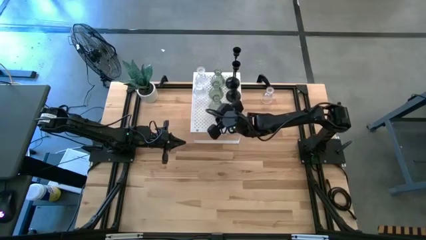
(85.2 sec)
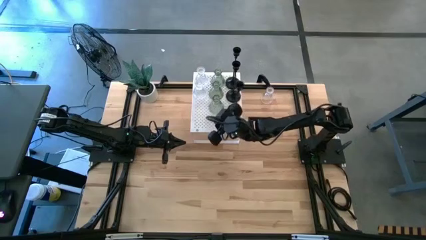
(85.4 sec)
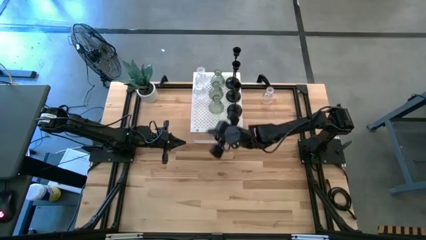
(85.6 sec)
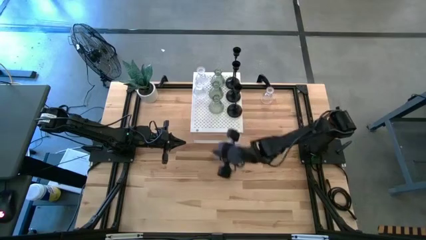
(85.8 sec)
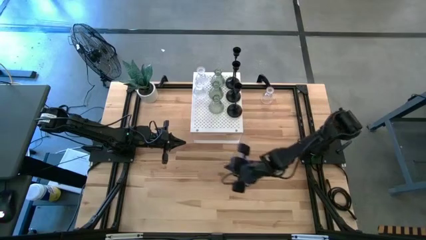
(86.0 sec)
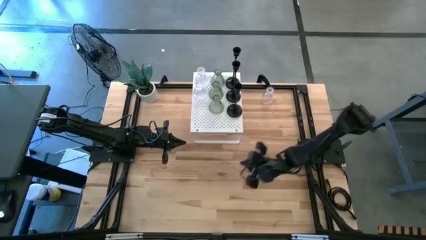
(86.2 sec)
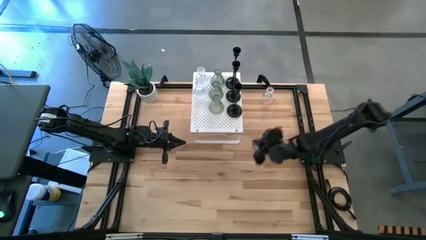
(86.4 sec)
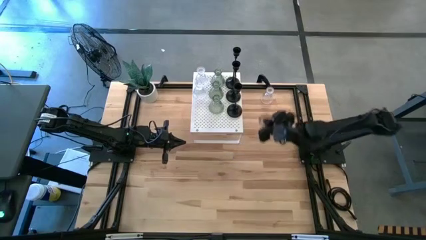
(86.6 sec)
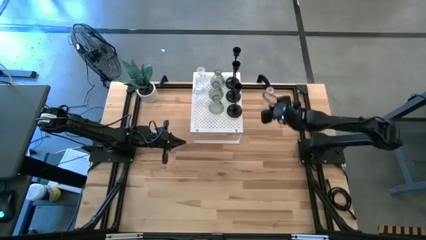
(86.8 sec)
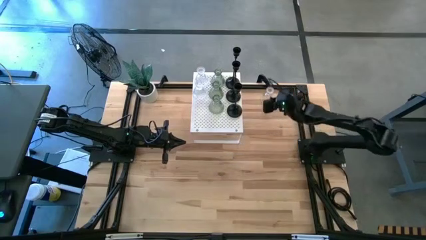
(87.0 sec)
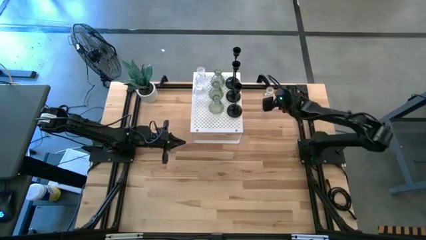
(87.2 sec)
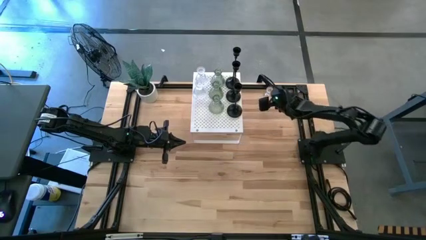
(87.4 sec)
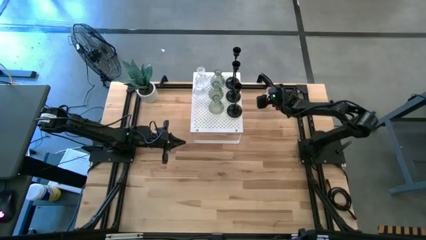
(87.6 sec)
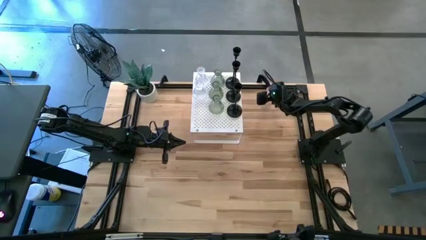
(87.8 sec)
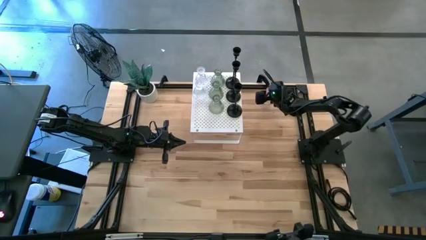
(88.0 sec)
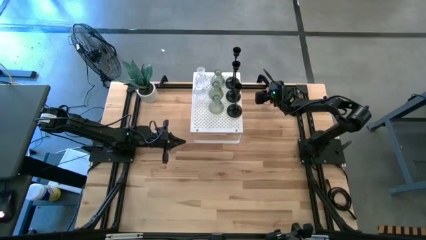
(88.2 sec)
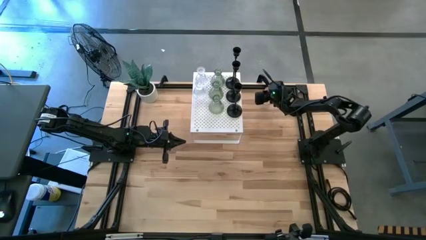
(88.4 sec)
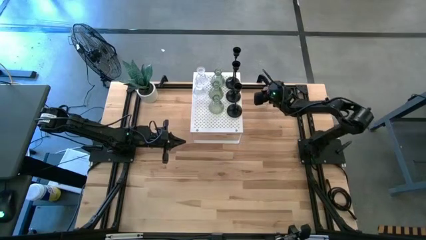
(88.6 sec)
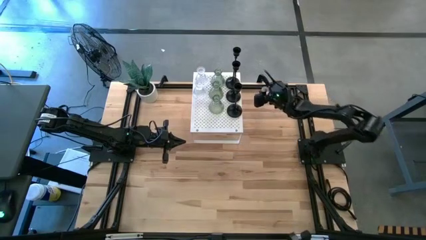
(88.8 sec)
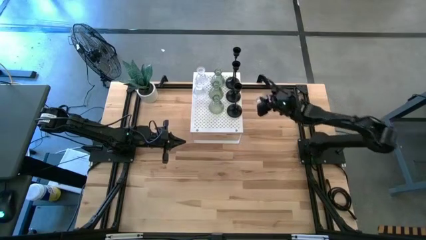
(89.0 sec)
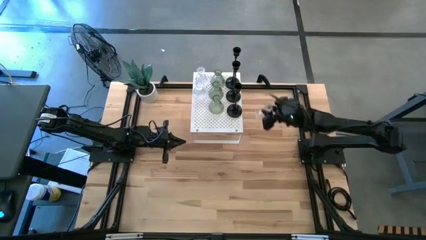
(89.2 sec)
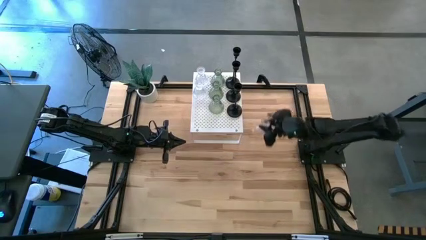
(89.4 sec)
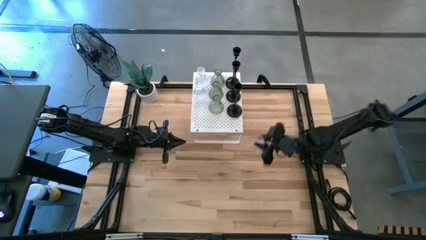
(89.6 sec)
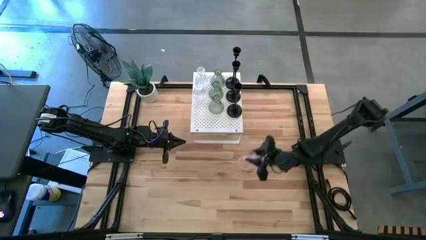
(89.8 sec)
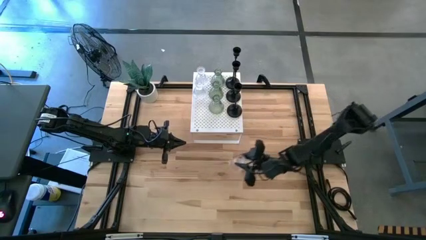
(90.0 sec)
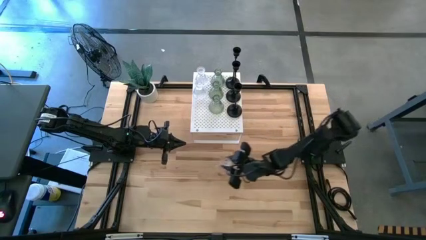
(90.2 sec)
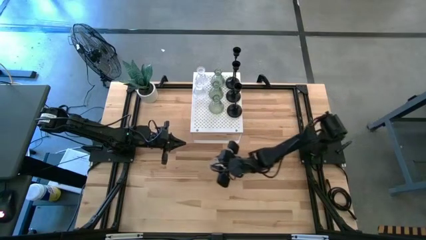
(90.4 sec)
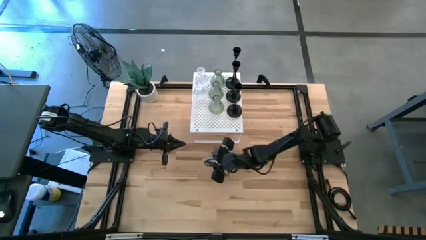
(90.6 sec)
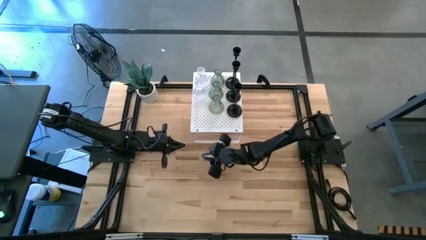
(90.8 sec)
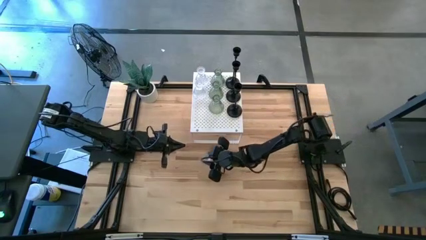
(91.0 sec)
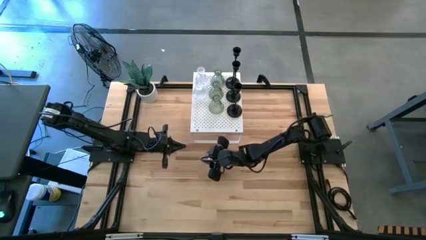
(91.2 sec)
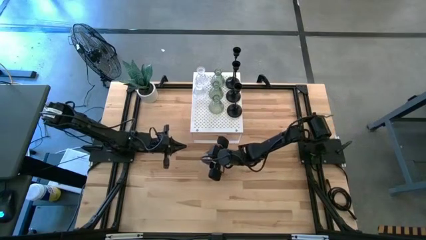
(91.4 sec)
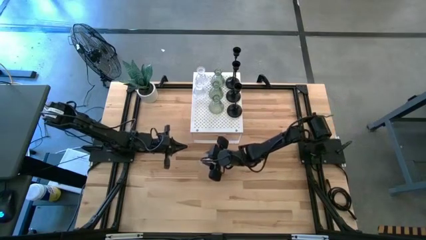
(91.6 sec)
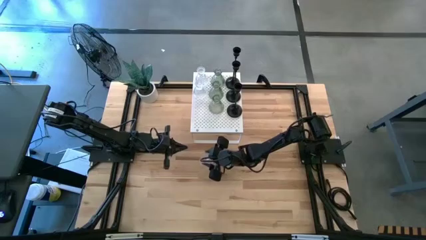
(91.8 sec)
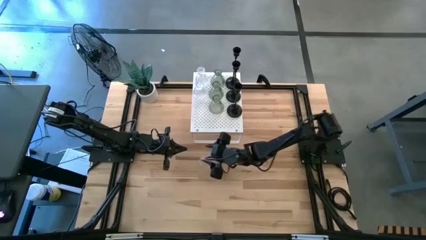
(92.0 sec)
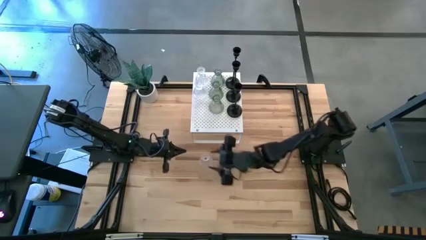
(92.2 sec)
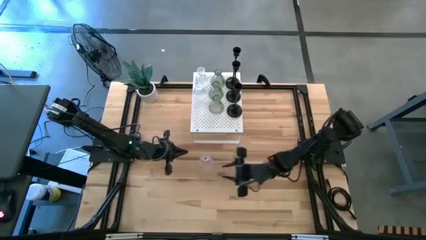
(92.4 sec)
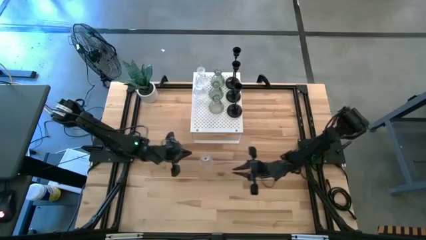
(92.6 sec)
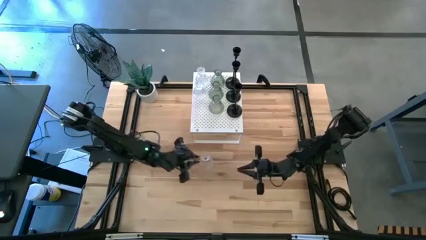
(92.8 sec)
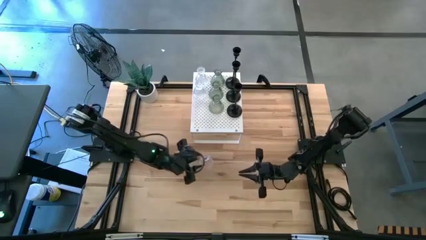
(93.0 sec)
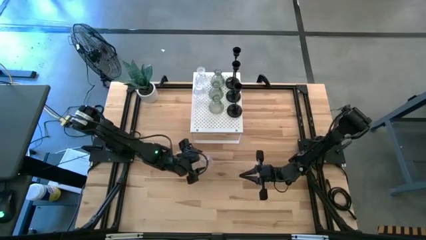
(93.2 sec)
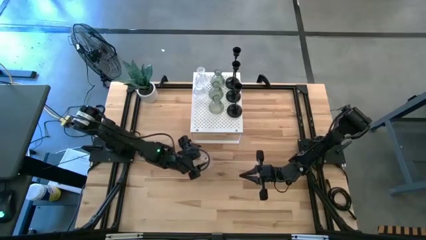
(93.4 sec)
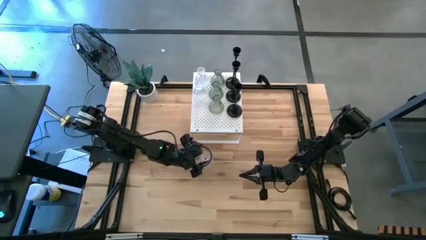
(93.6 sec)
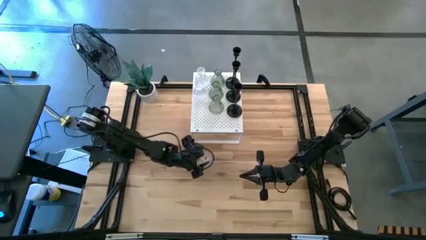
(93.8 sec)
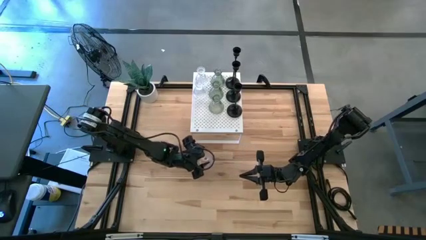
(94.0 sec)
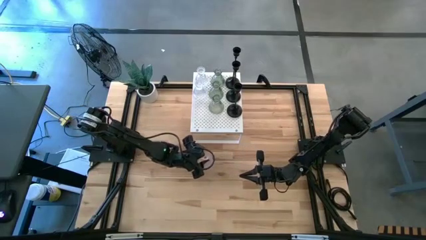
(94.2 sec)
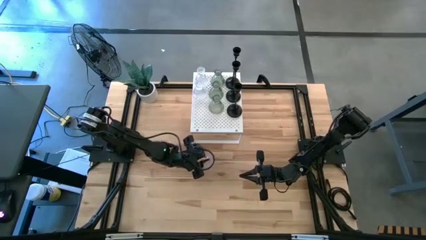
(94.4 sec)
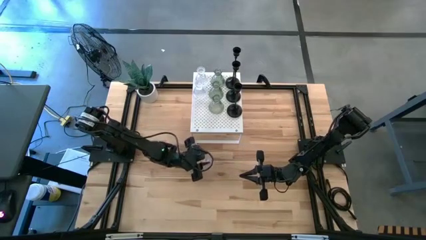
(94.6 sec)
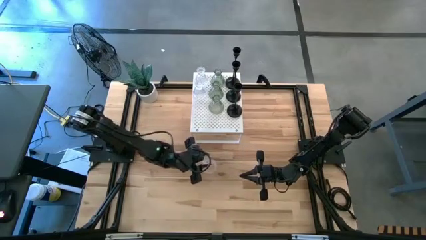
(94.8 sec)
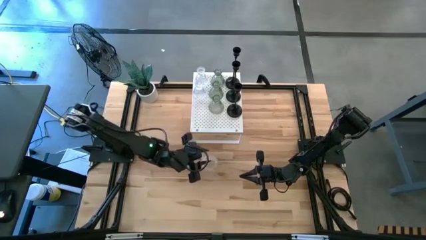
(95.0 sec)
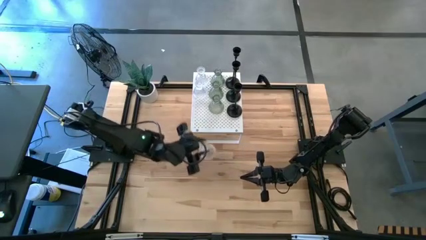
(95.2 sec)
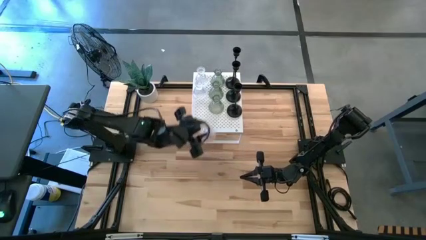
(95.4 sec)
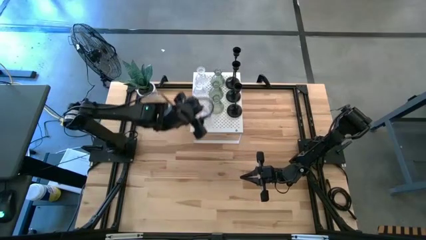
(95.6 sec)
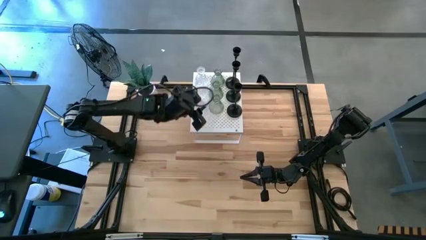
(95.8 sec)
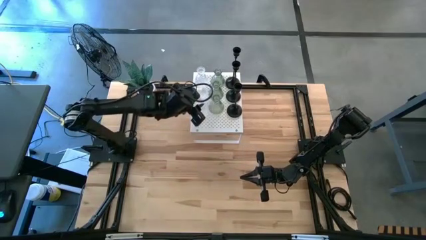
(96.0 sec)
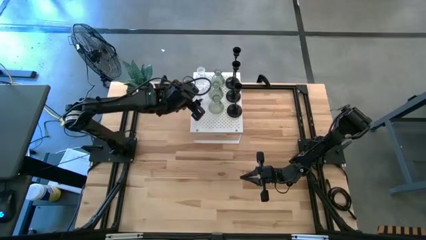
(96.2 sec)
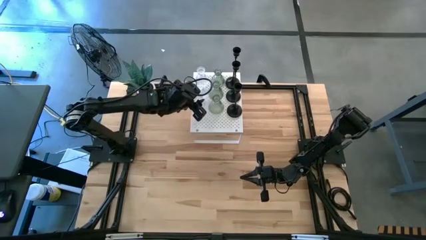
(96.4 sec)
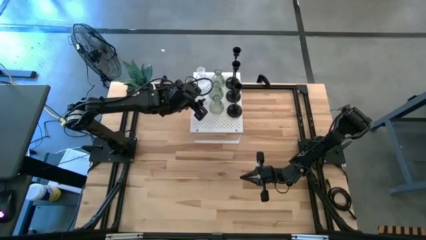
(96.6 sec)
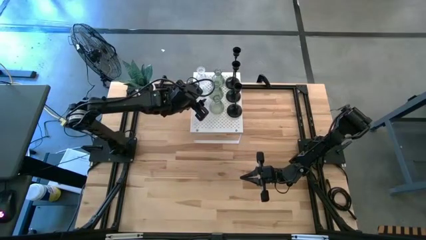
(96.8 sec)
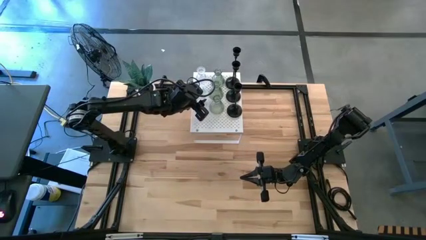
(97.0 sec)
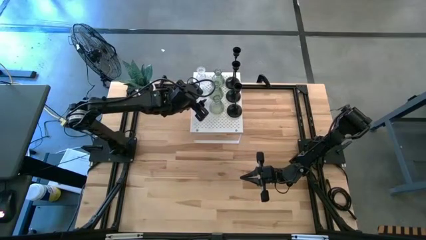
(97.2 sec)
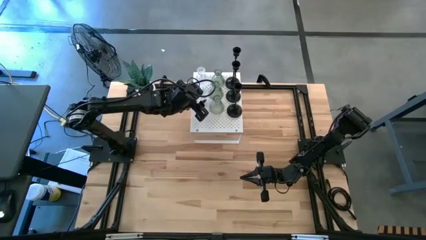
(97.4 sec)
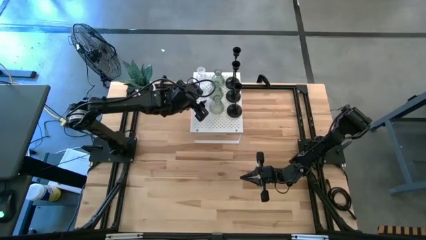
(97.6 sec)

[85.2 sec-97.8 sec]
Task: Pick & Place candle stick holders
Put the transparent candle holder on the shelf aligned with the transparent candle holders

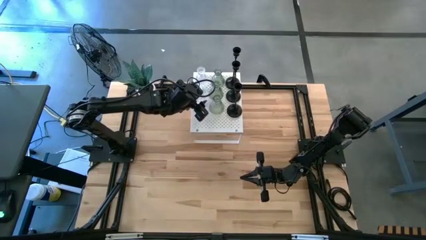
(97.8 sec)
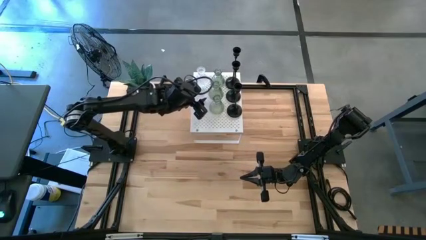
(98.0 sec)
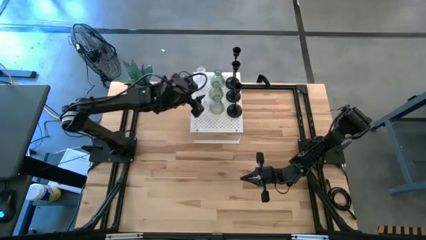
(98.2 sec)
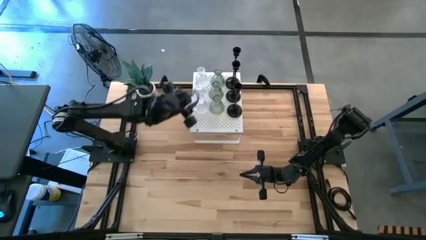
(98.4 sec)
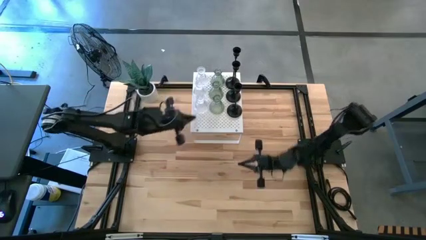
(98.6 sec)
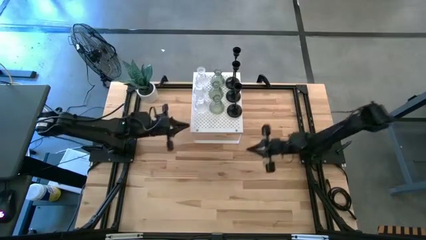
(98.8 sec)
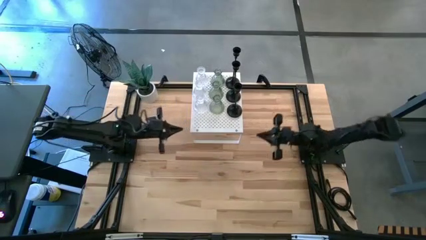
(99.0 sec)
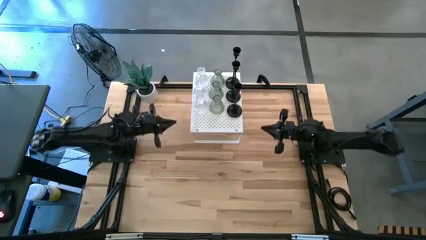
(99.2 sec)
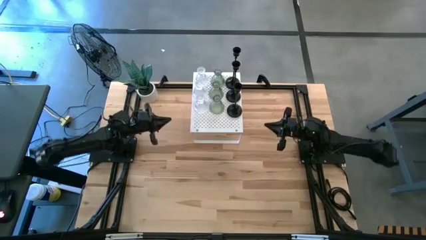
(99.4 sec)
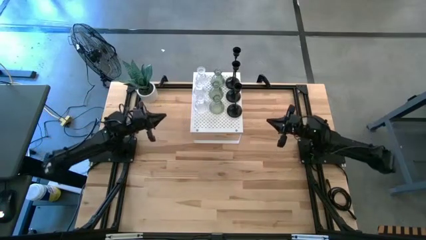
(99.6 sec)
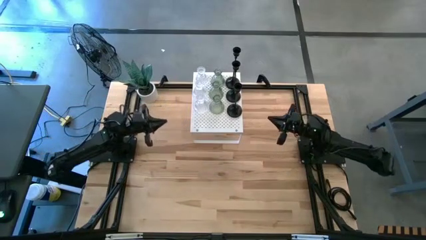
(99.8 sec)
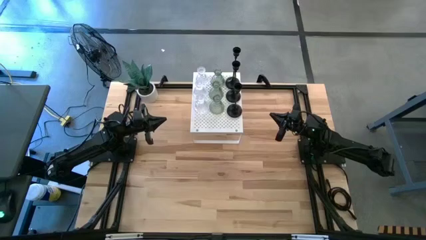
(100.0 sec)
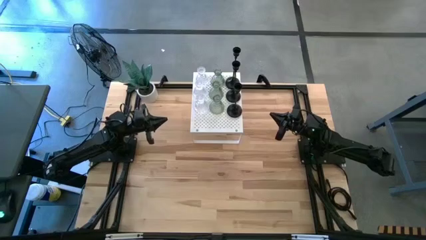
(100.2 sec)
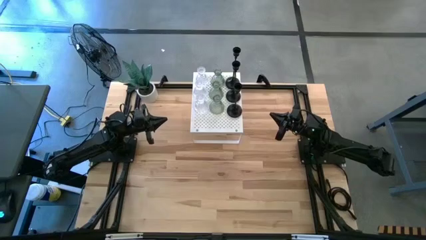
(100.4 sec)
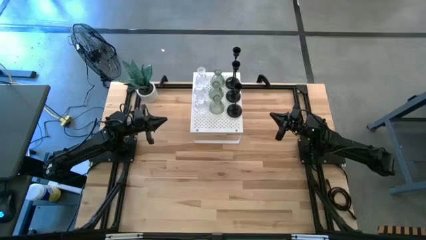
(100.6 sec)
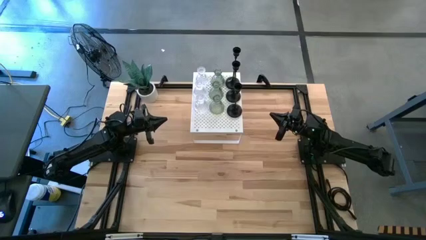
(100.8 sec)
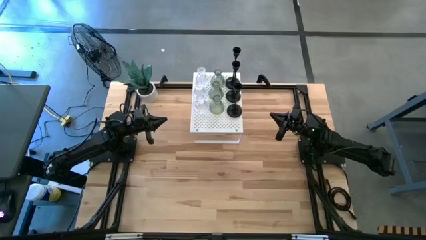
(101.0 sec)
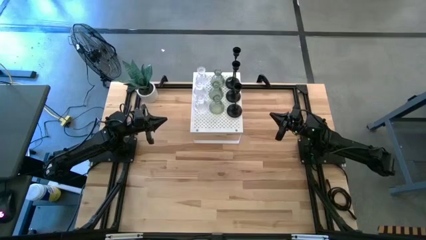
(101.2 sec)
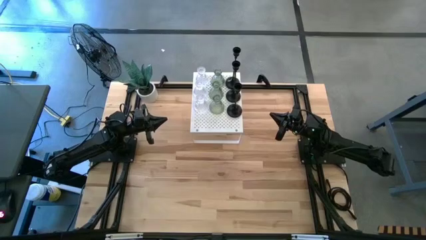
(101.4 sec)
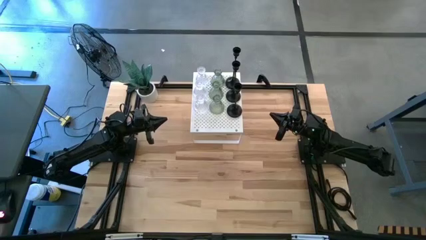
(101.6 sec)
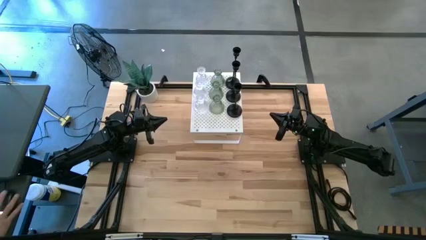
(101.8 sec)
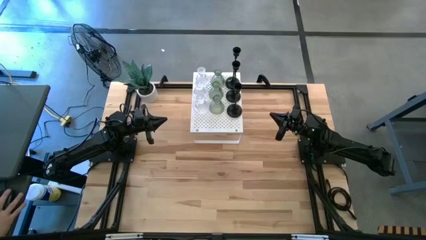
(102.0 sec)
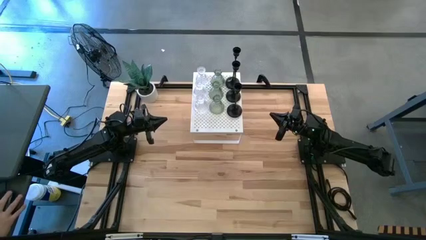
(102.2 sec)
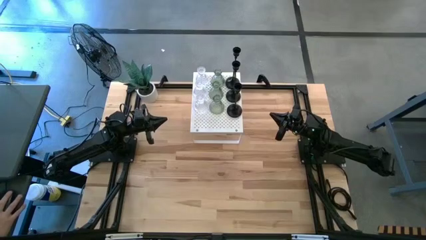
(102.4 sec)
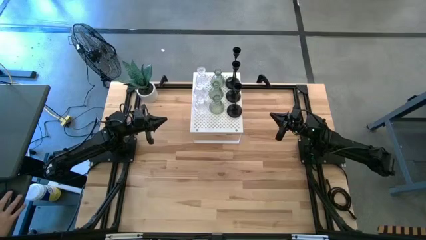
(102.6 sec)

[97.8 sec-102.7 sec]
Return to Home Position
